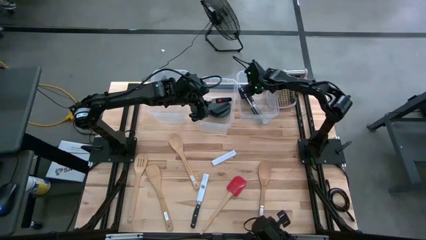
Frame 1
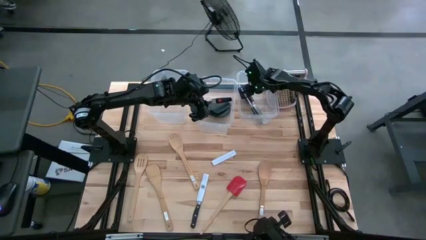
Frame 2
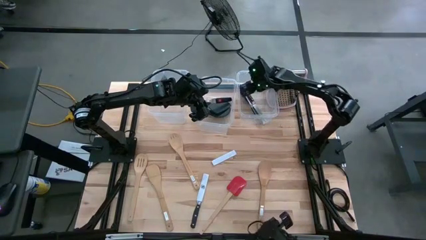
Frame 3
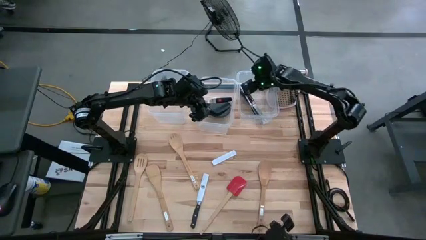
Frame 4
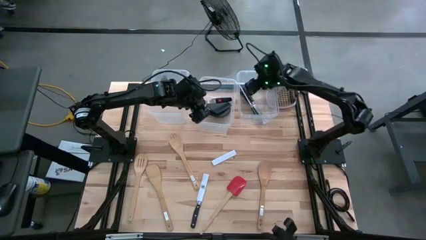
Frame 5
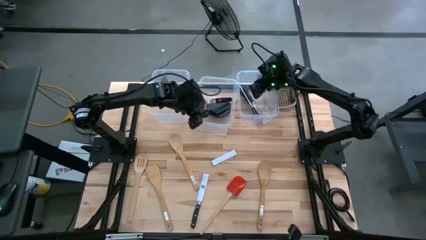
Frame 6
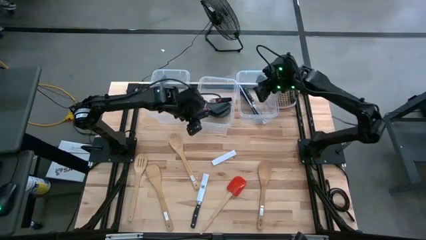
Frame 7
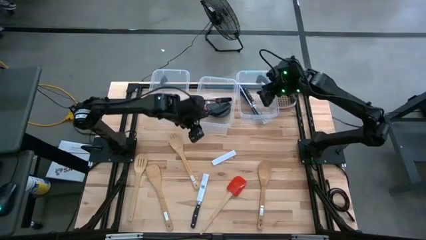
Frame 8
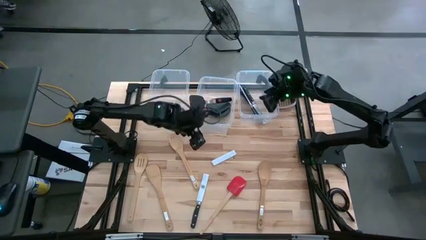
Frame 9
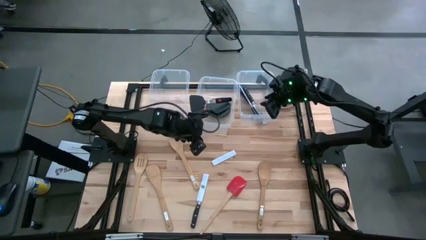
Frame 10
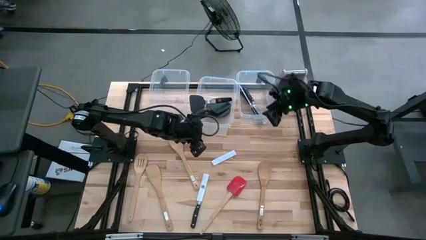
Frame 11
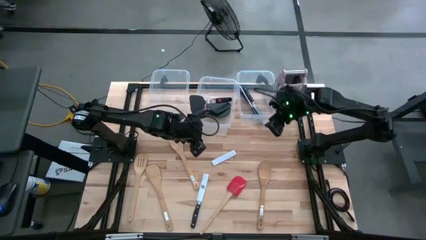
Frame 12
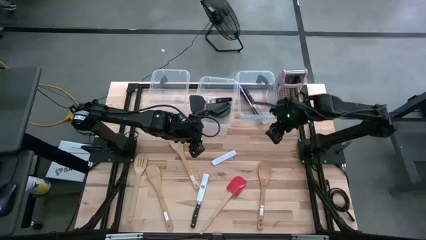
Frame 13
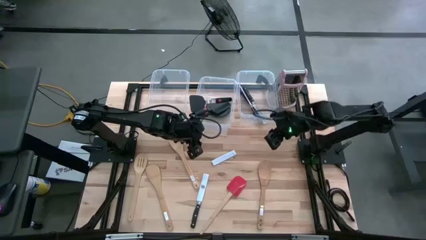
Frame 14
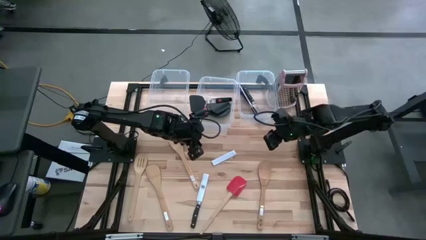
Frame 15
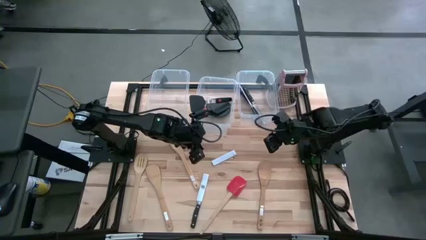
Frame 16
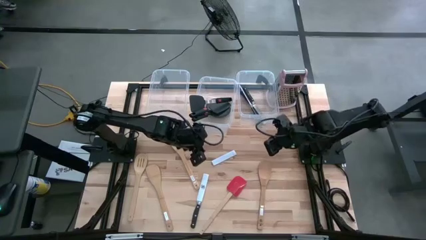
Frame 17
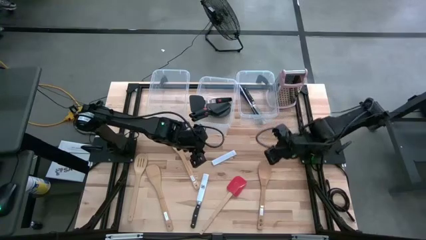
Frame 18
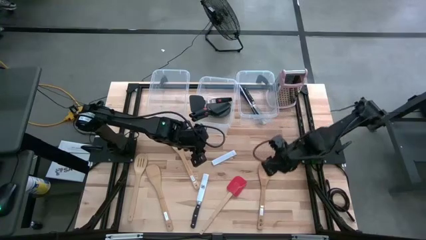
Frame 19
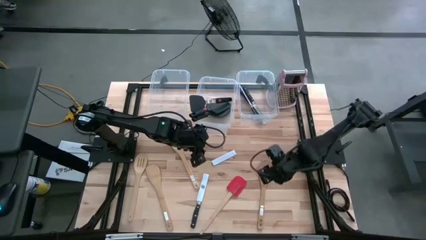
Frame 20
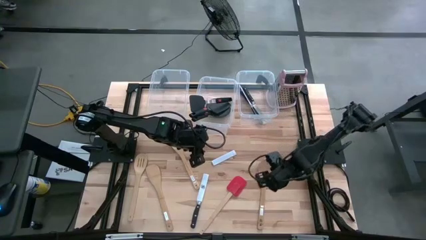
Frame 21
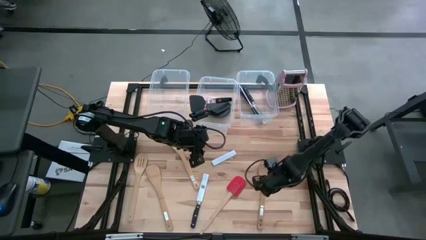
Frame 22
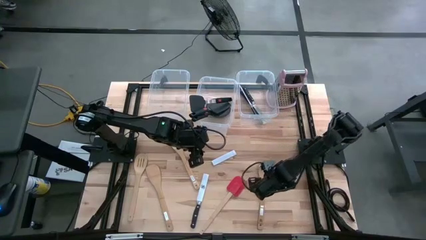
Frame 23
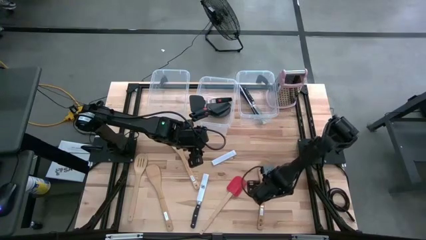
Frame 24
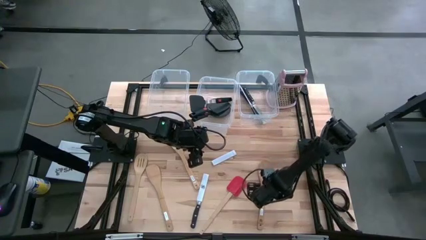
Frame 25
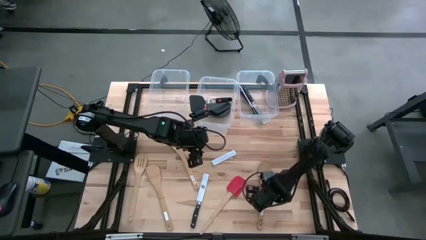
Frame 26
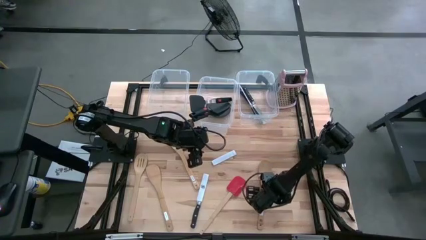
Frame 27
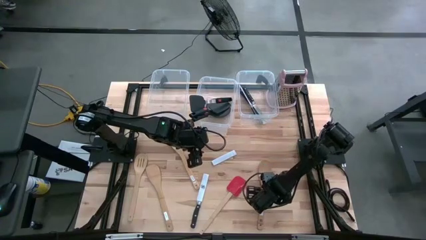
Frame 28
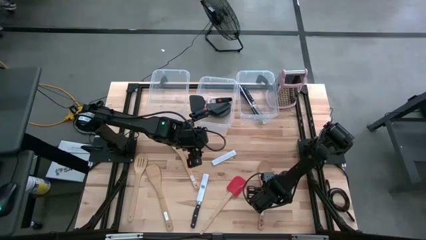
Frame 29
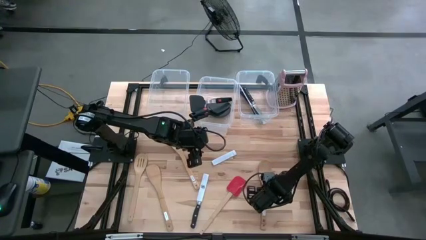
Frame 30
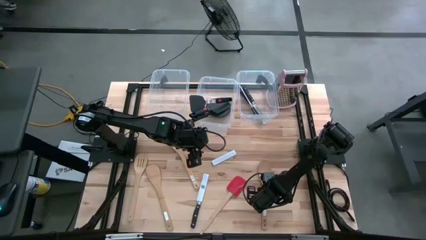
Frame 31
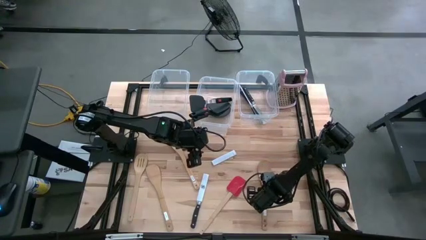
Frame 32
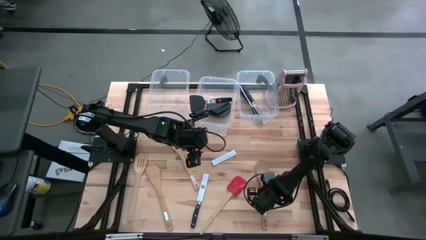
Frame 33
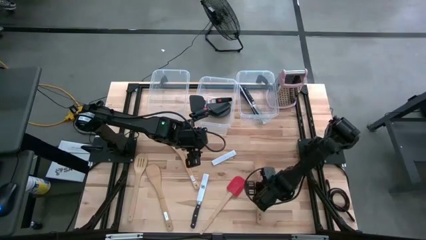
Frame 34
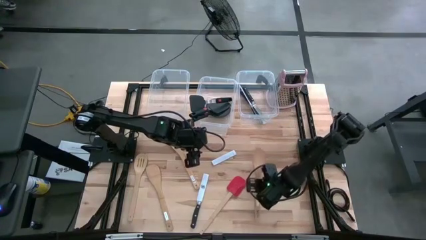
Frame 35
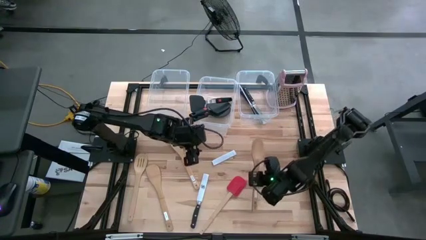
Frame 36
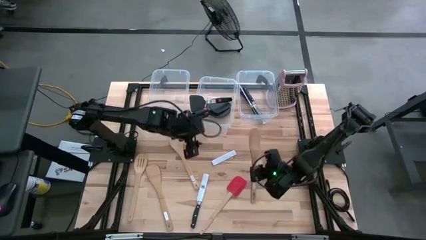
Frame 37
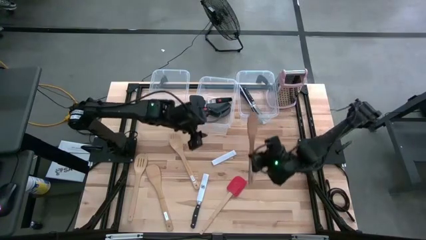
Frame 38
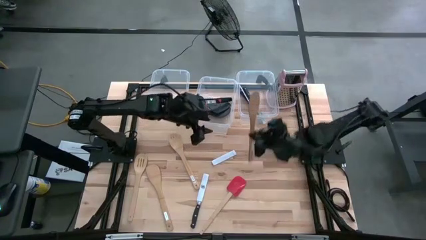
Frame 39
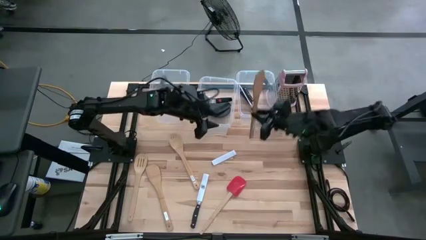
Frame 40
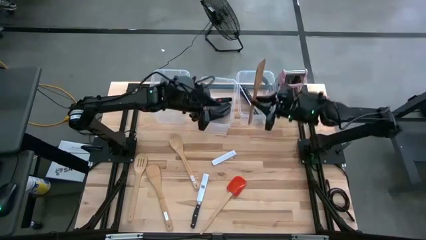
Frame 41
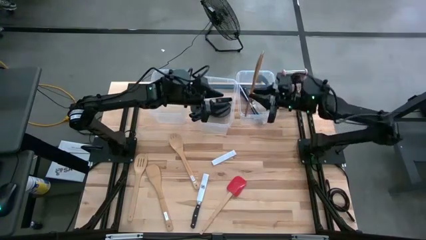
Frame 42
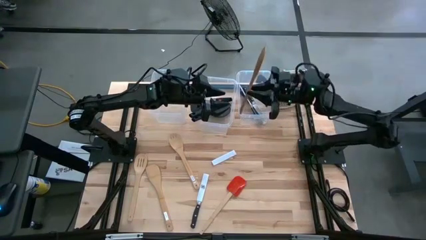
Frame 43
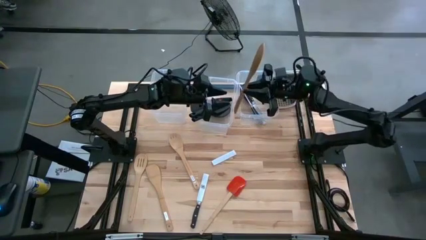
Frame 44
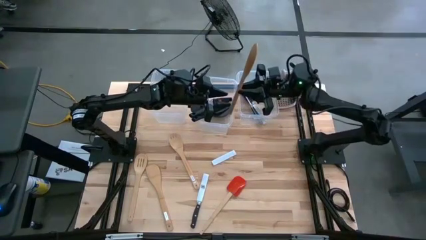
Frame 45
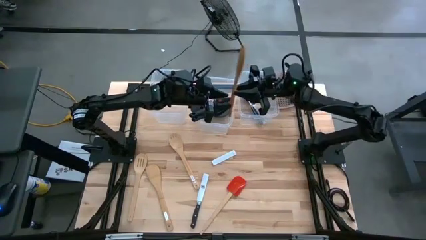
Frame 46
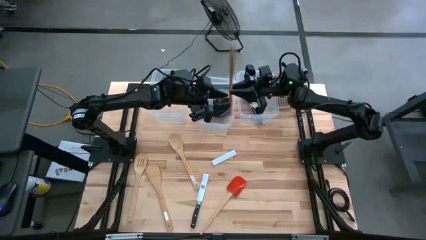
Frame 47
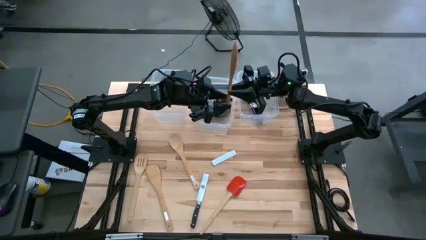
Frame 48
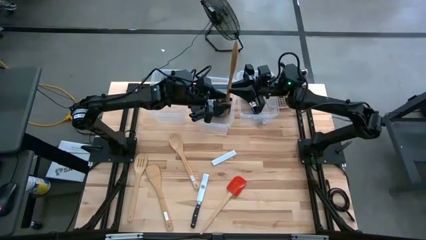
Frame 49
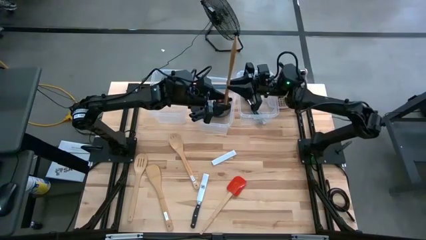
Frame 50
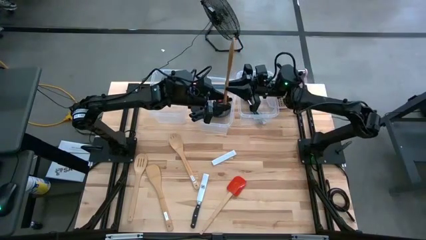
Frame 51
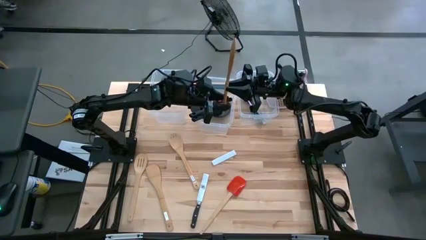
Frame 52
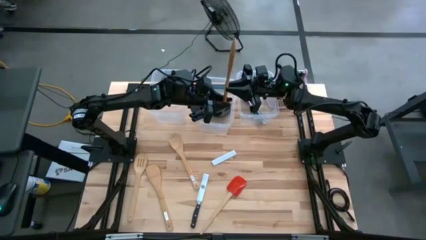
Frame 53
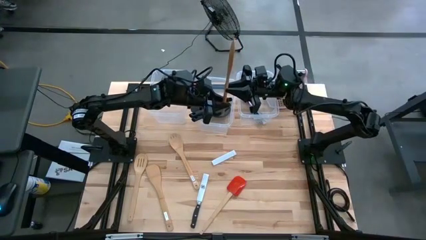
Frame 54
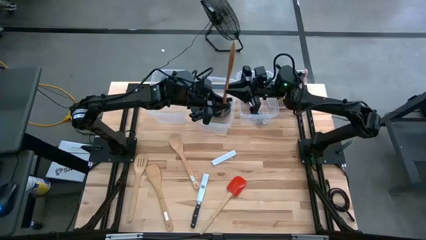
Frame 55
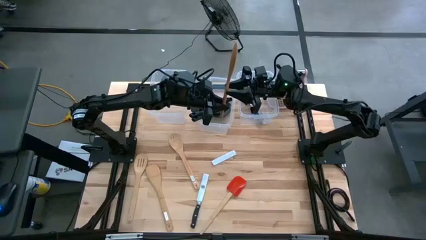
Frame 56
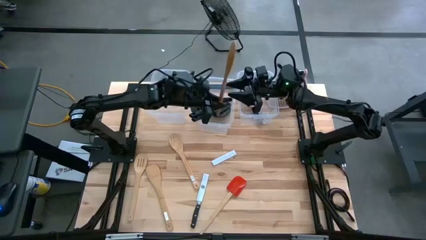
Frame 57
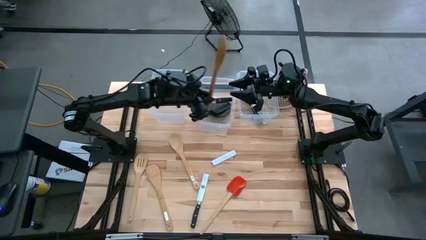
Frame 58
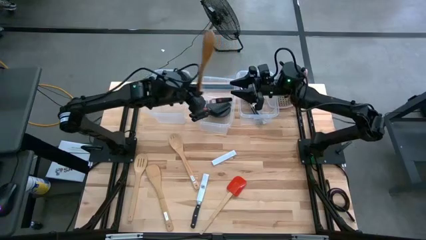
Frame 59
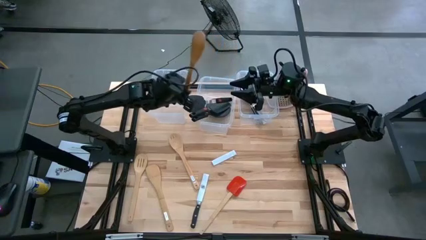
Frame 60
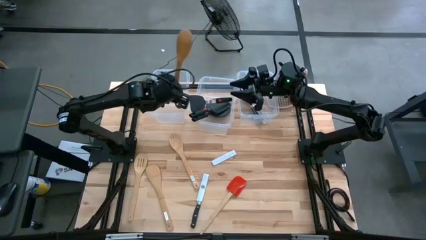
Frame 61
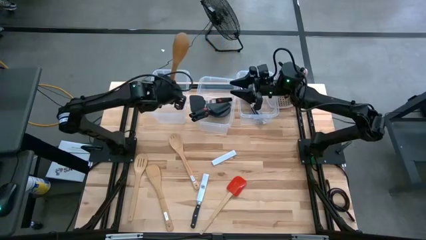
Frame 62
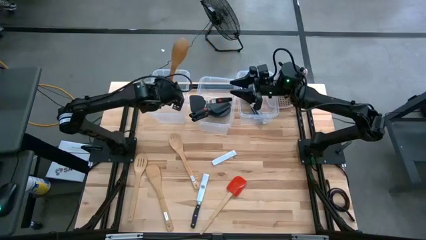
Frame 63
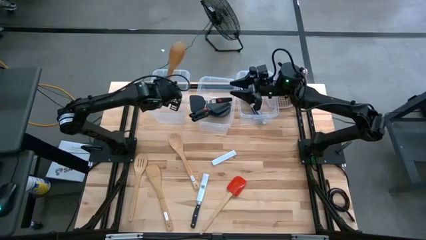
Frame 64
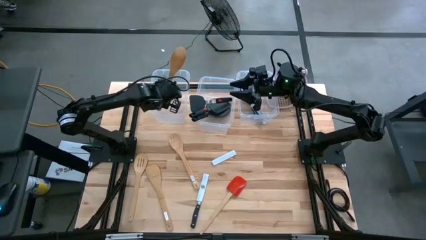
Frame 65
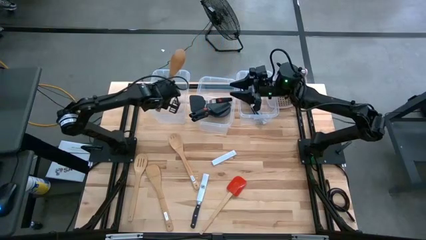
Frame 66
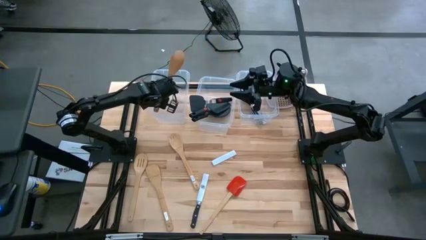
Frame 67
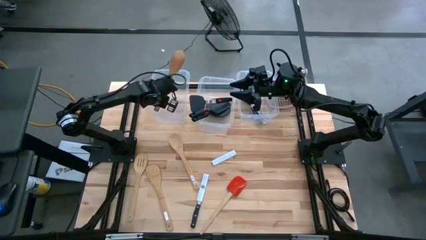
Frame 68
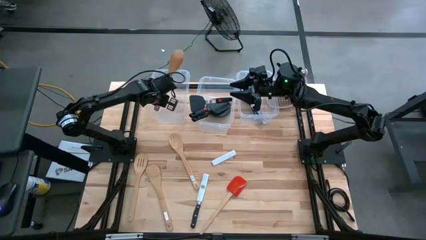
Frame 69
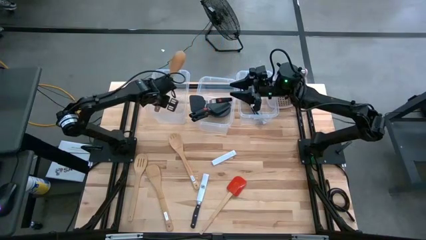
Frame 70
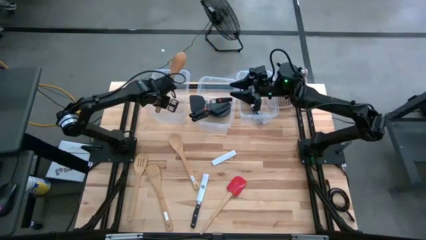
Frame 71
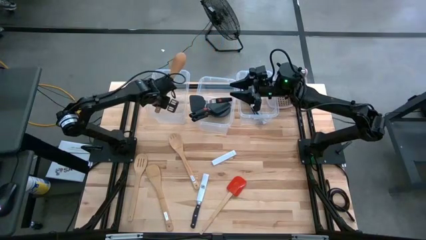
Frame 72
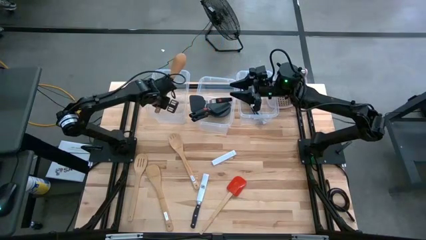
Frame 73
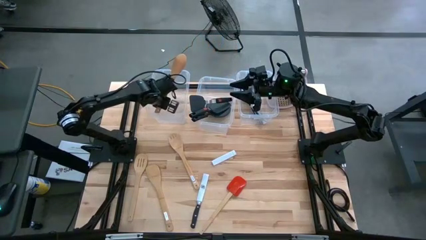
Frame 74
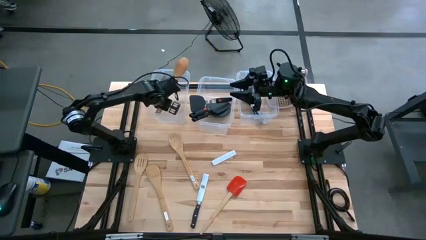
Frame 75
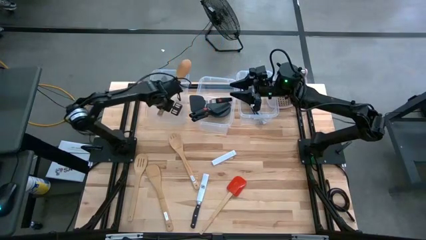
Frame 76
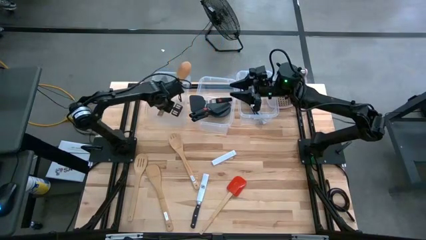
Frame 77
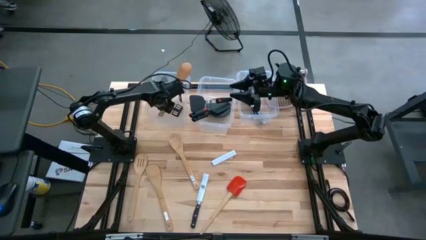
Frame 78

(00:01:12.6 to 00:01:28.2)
Task: Pick & Place Kitchen Items
Put the wooden serving spoon into the left bin
